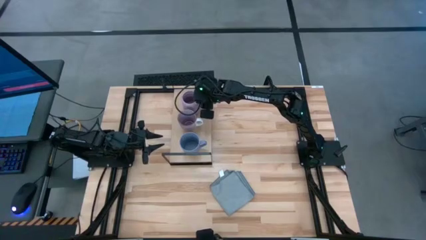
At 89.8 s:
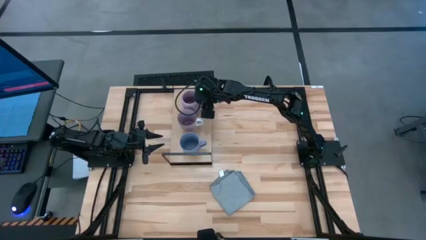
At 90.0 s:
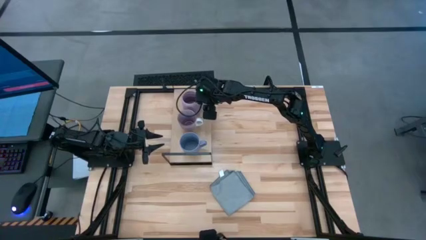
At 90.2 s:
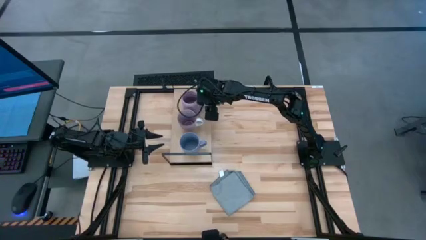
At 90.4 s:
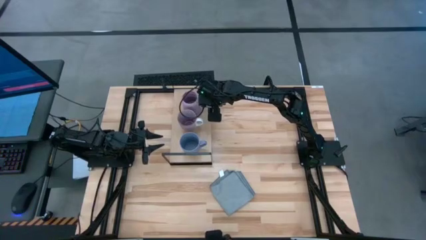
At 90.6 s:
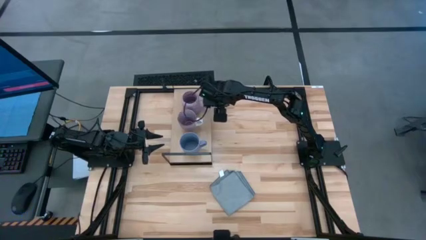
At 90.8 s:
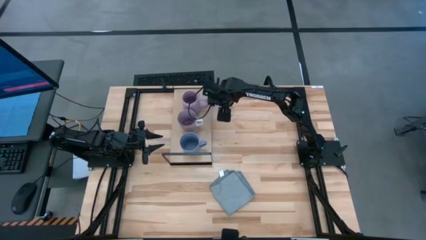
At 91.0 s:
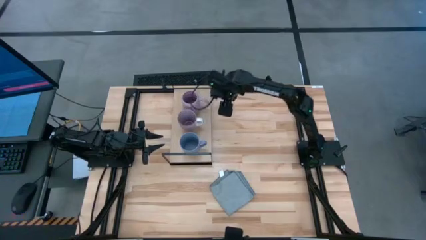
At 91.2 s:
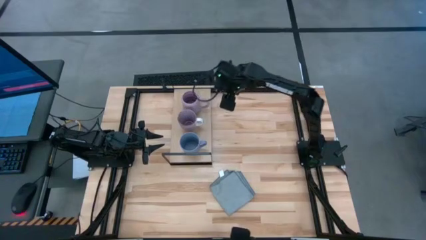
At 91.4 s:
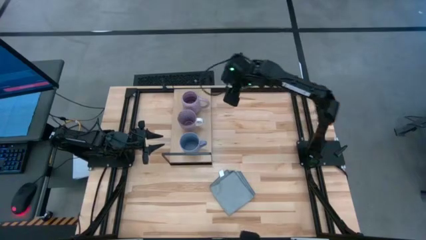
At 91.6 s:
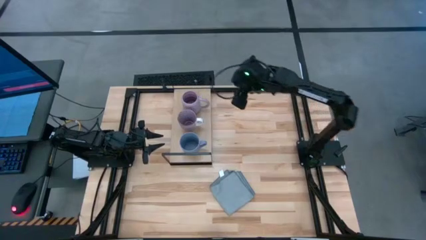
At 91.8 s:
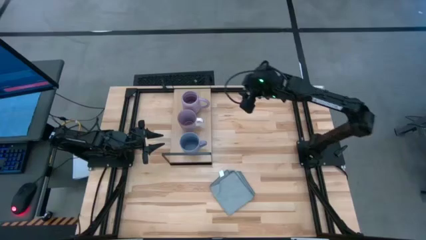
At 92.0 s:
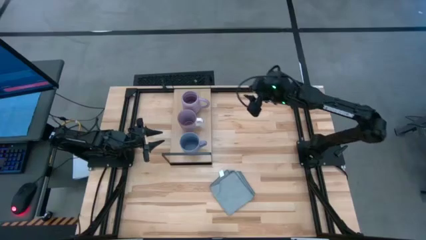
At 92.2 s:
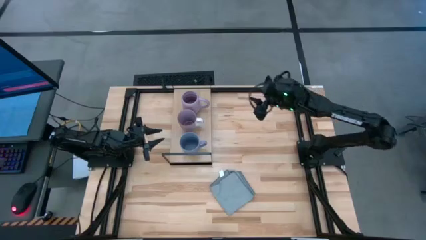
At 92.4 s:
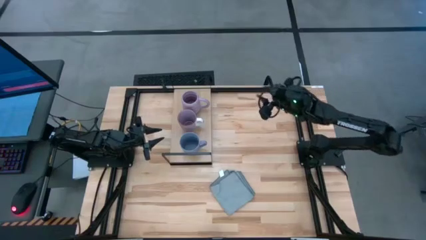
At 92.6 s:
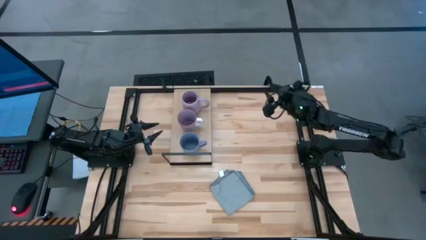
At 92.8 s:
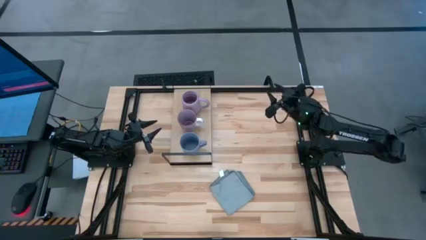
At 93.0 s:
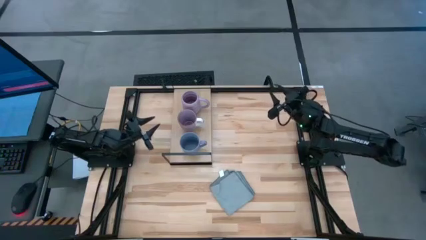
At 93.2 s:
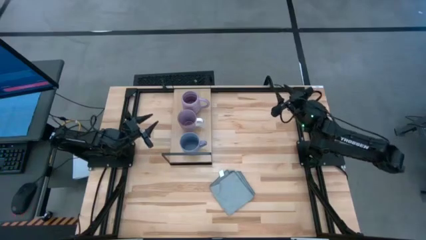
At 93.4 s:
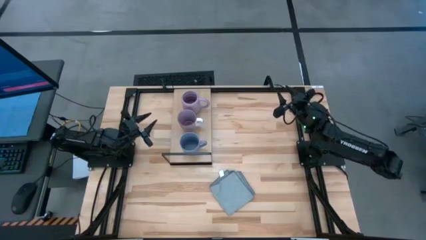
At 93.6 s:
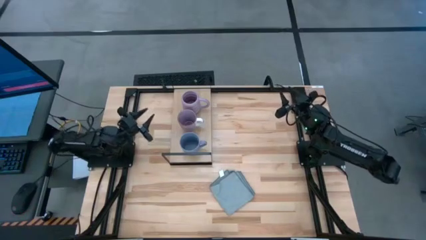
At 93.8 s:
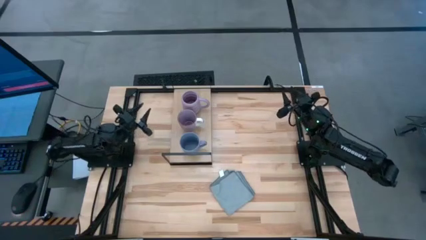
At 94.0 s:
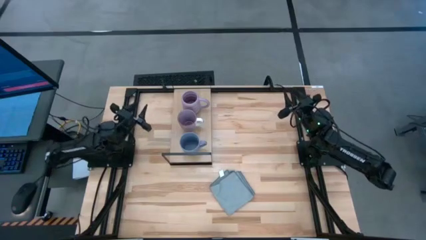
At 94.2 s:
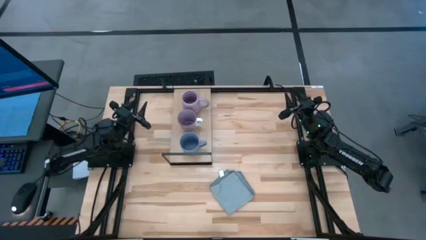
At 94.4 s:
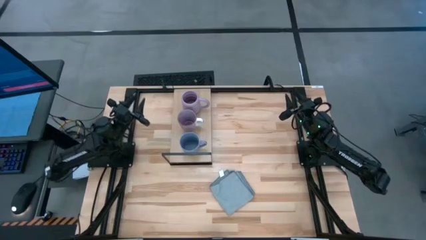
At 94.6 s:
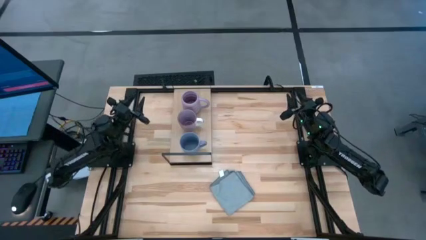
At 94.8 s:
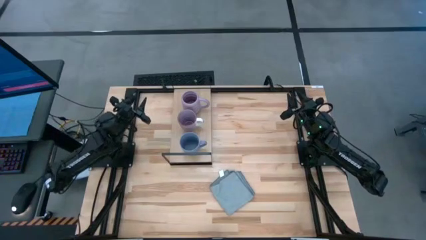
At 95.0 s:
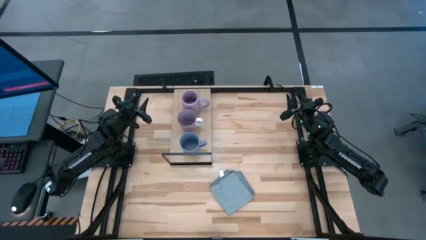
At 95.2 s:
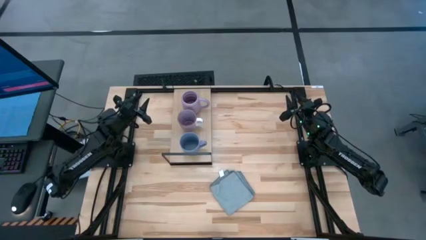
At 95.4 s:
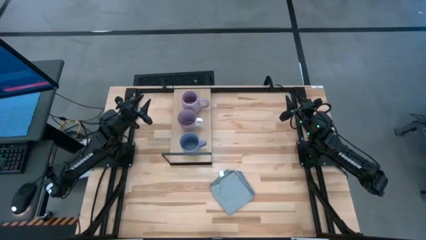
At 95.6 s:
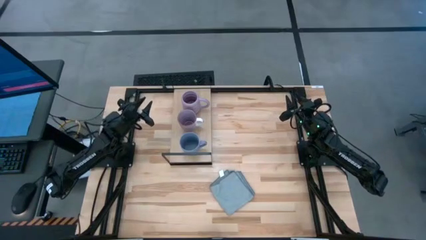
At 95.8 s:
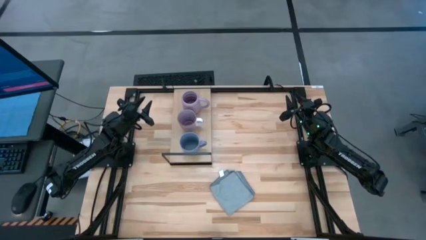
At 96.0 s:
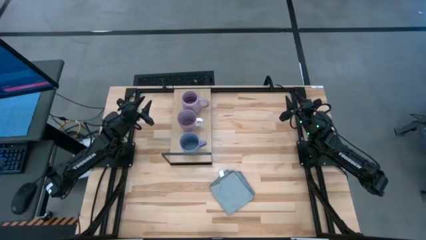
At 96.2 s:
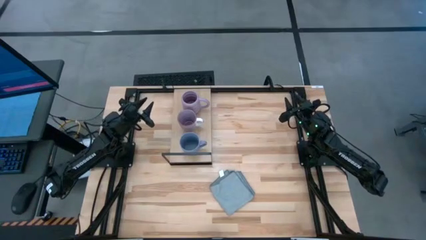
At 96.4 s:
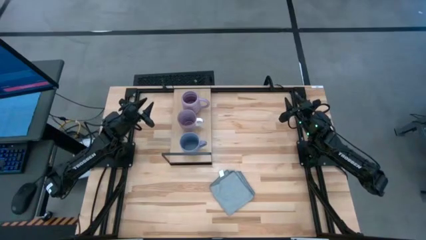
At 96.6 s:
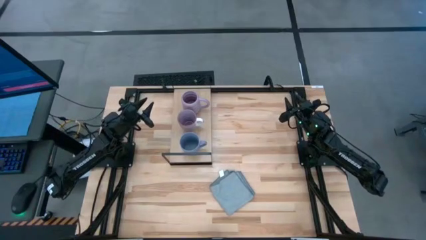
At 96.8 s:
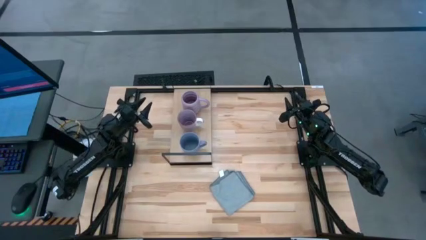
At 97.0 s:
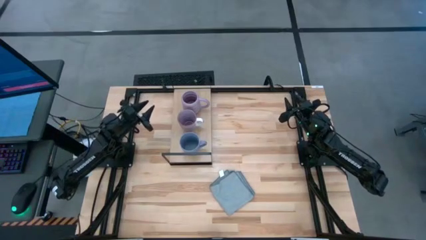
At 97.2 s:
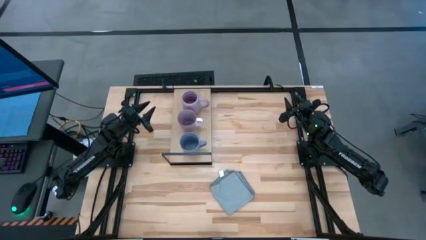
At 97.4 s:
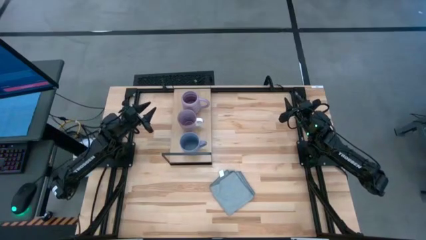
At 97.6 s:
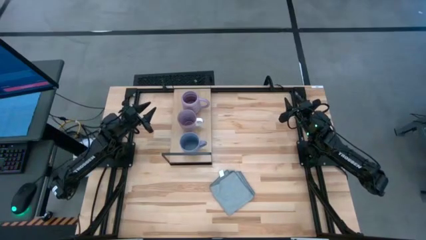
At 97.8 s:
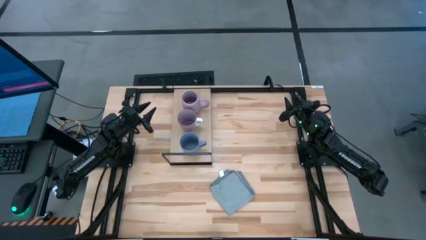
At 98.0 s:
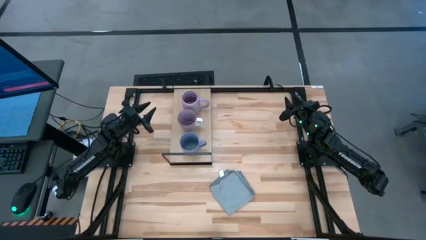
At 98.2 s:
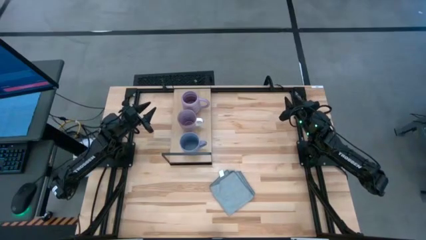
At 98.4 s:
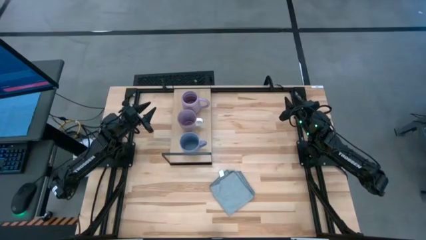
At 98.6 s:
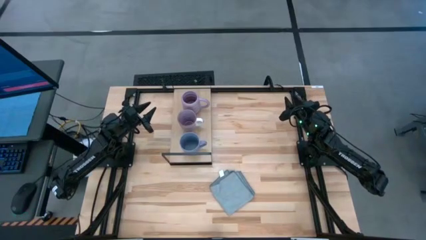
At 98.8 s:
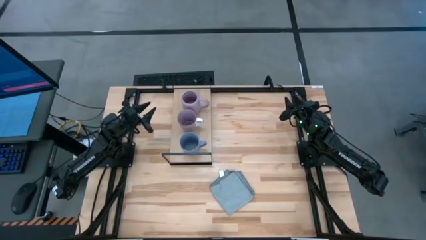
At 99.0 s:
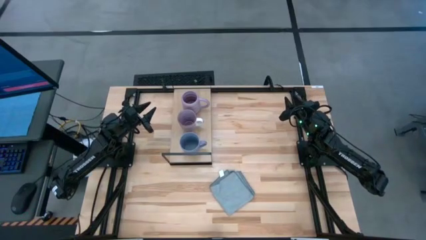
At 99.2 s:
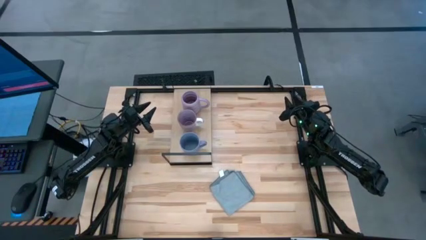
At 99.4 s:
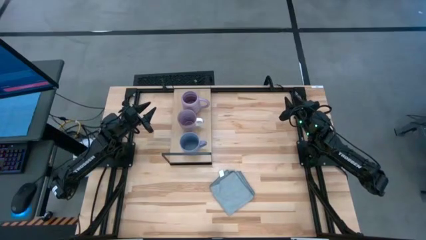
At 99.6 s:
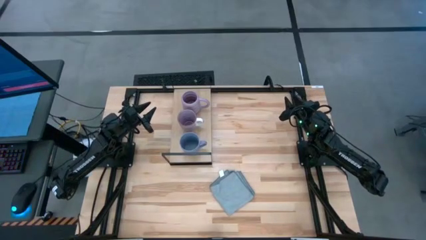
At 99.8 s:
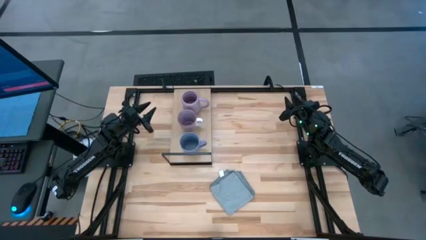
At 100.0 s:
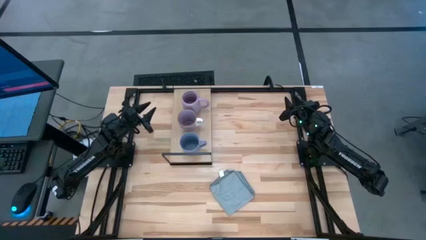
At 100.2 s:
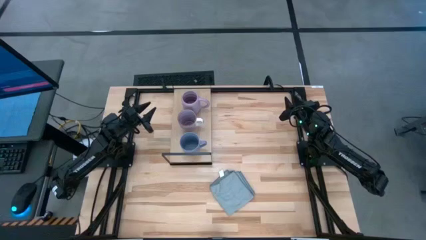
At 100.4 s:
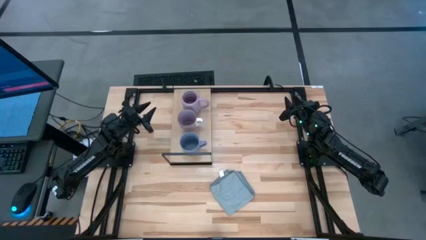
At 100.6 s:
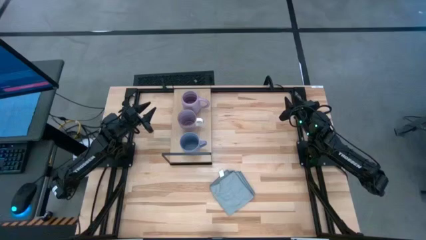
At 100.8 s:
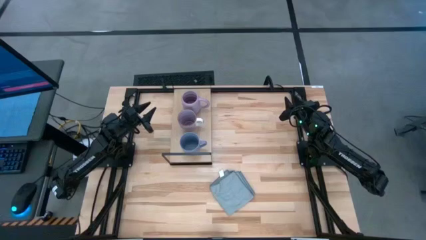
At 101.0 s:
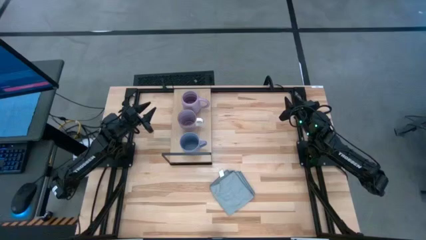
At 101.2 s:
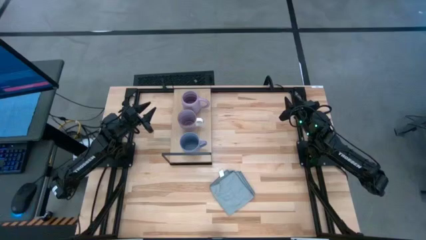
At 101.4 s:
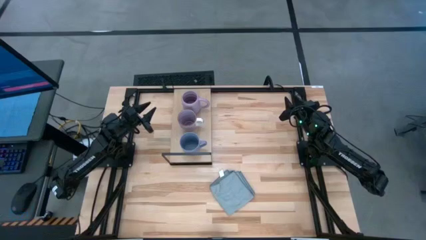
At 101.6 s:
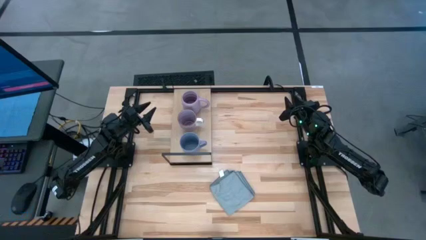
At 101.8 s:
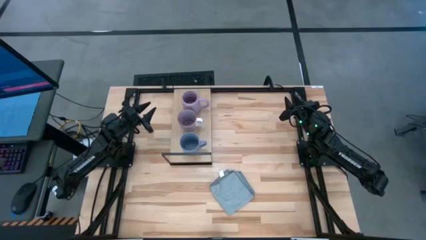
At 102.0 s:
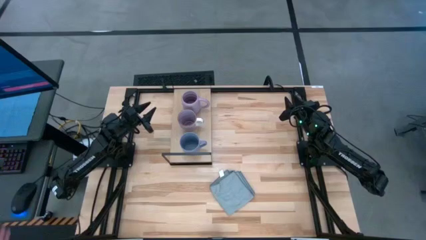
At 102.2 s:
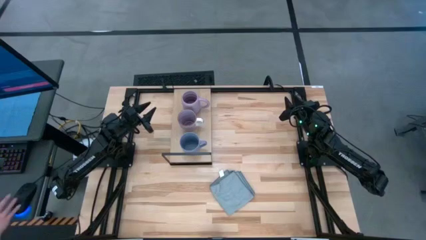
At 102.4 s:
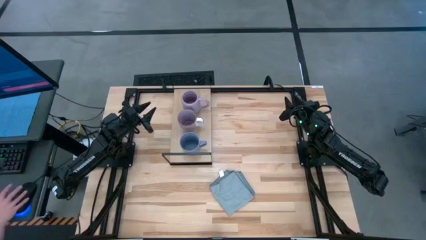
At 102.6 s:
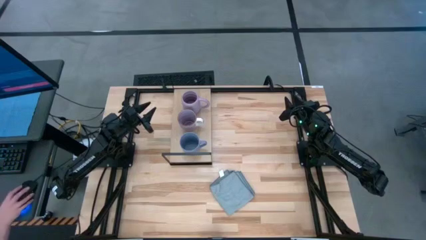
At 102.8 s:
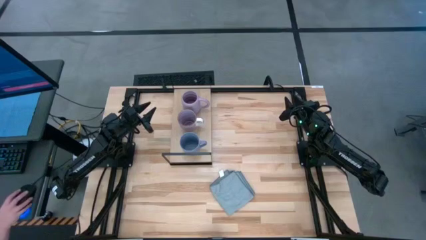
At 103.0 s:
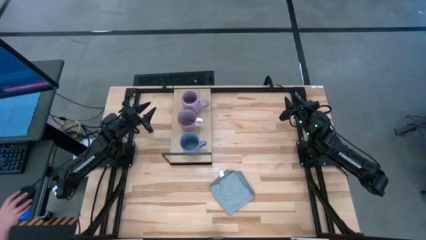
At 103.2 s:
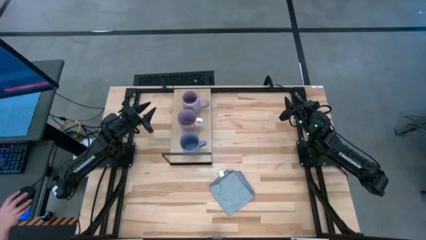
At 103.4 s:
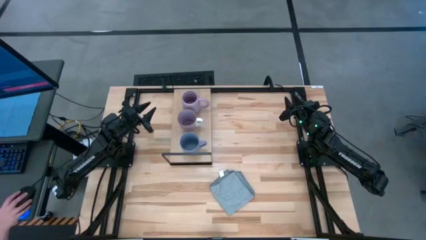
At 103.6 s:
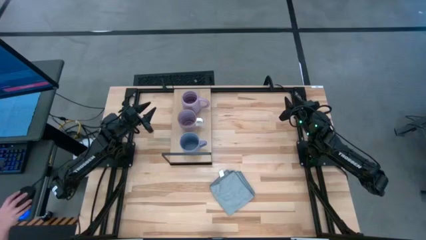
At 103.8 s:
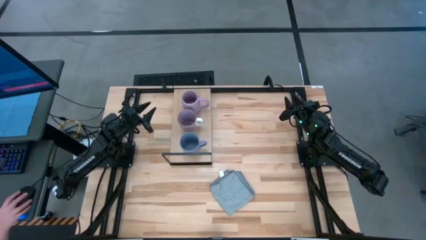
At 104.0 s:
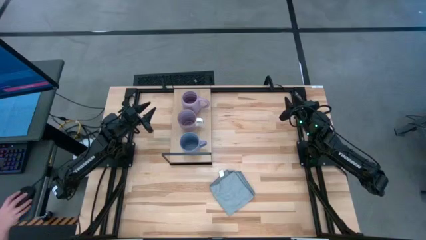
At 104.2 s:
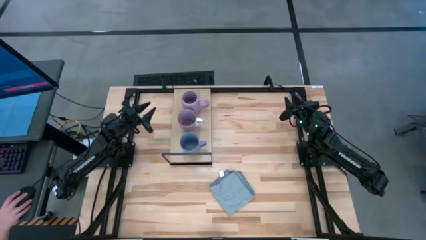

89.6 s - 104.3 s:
Task: Stack small to large cups/mugs on shelf
Return to home position
